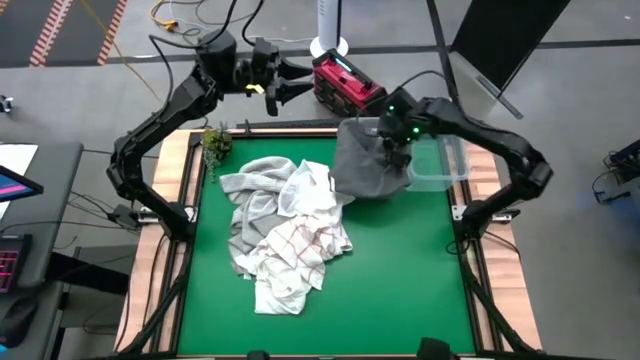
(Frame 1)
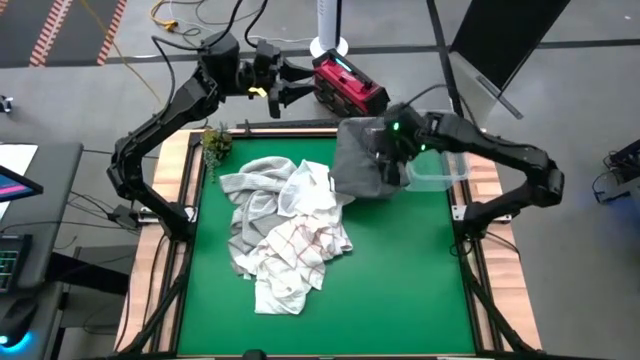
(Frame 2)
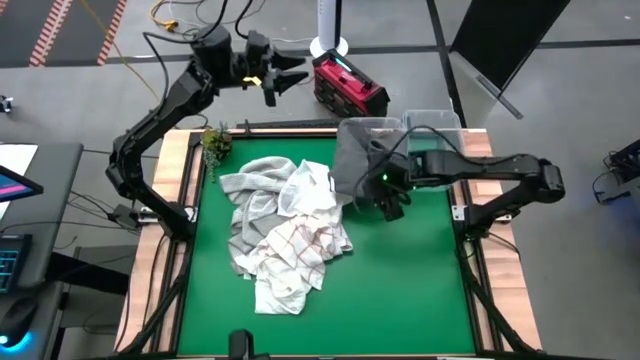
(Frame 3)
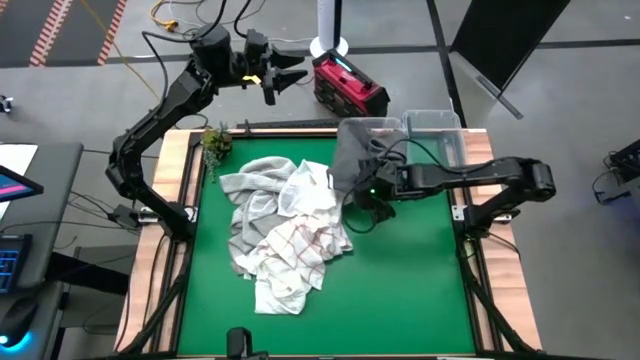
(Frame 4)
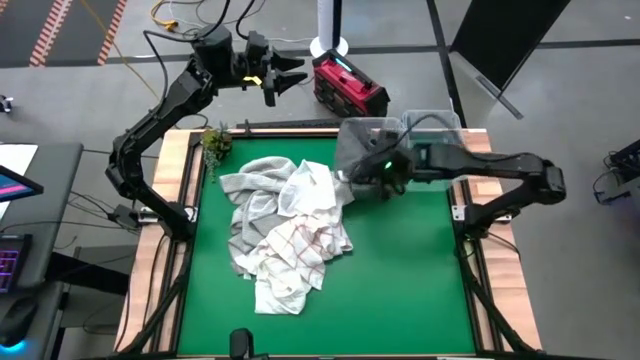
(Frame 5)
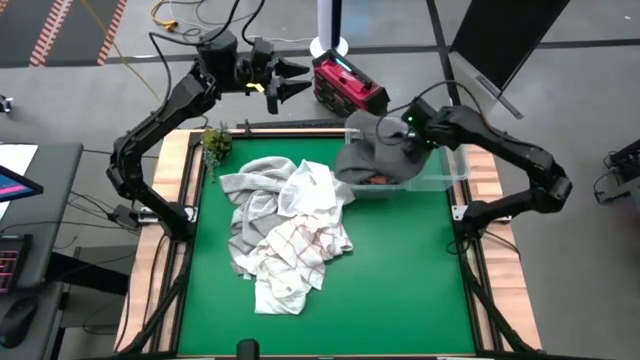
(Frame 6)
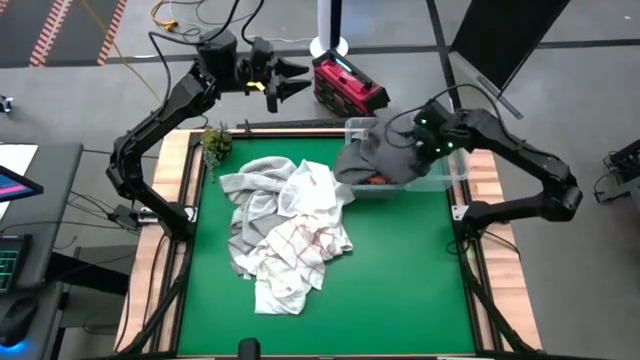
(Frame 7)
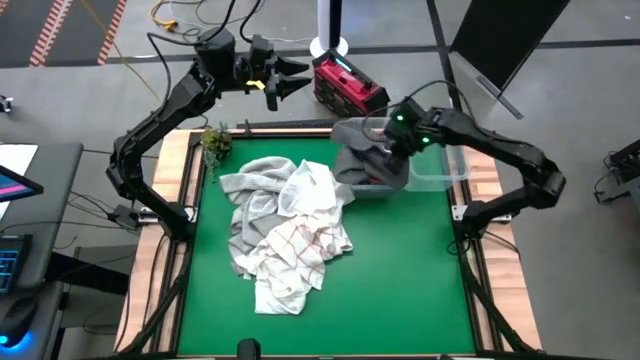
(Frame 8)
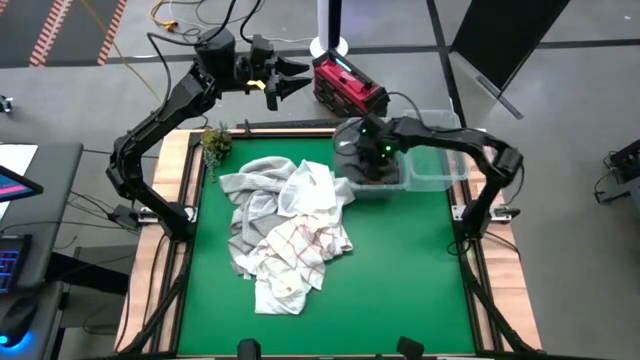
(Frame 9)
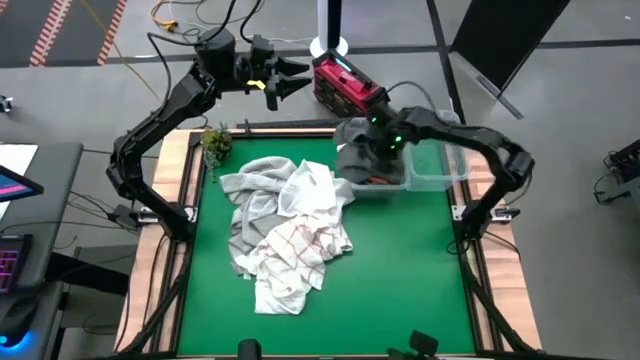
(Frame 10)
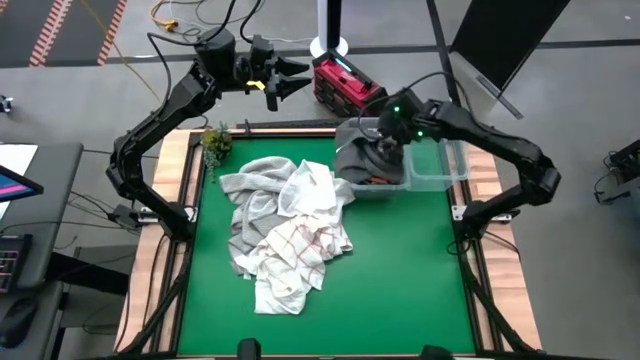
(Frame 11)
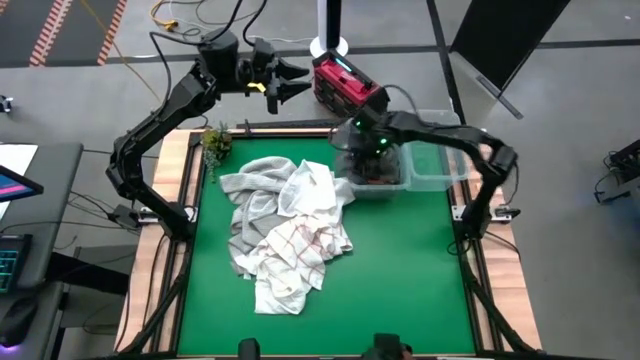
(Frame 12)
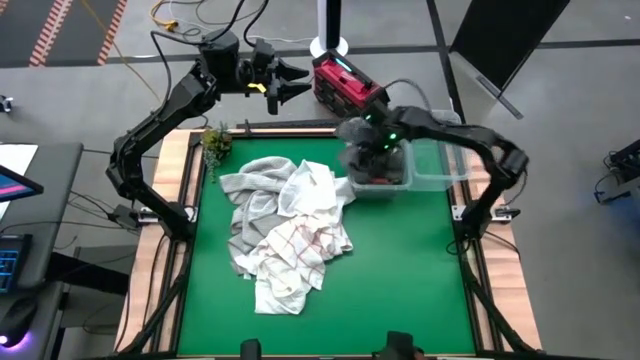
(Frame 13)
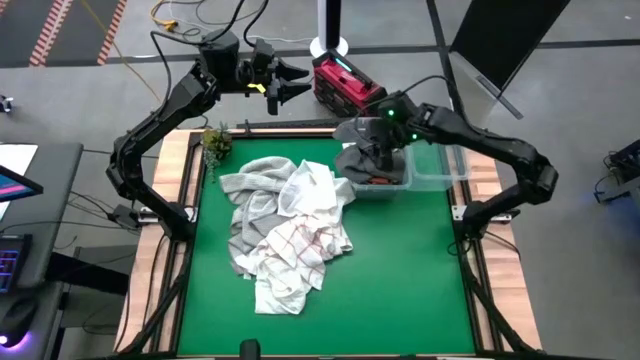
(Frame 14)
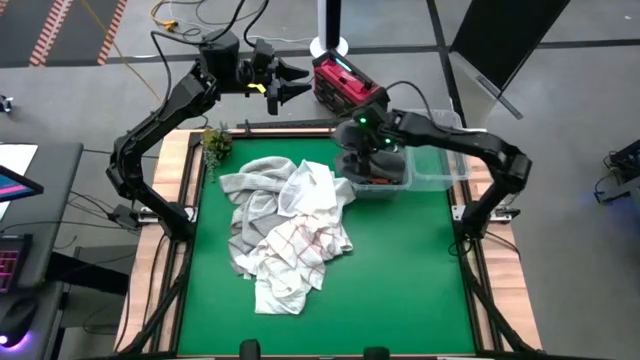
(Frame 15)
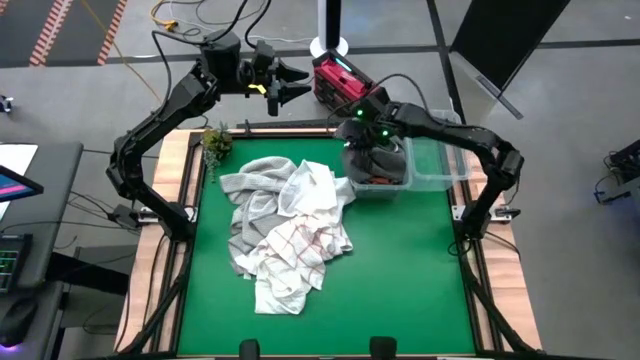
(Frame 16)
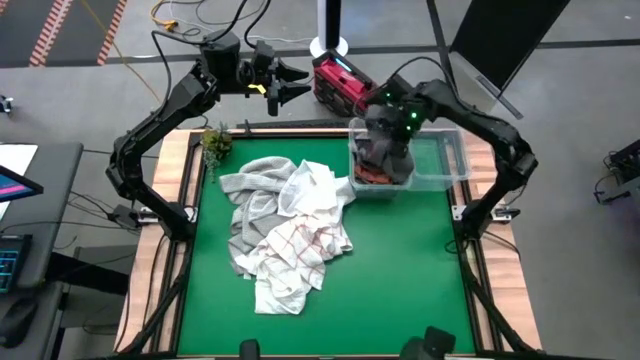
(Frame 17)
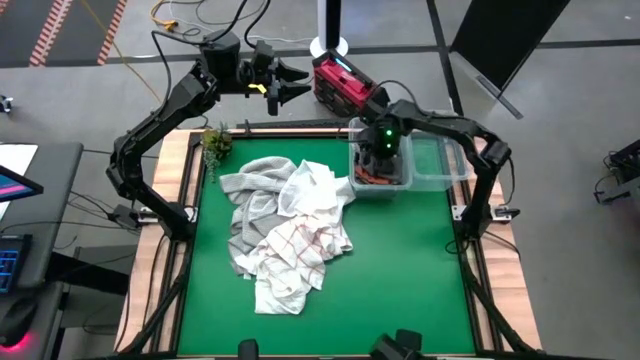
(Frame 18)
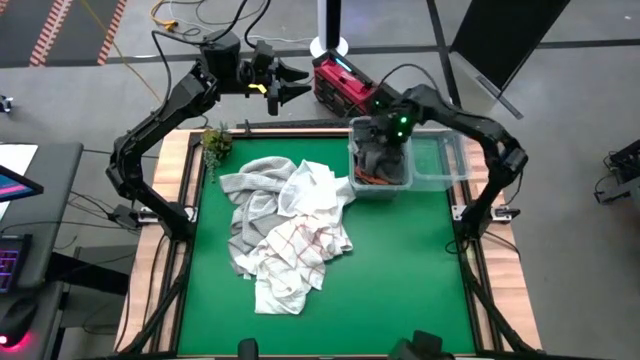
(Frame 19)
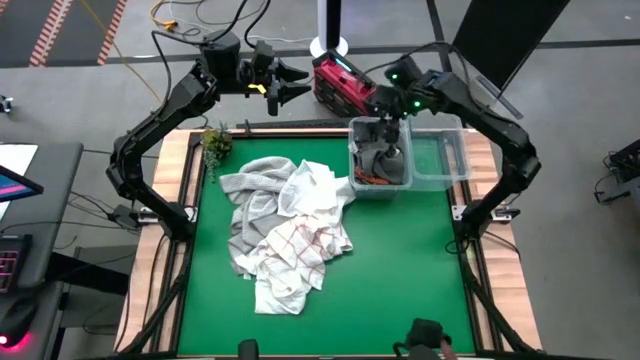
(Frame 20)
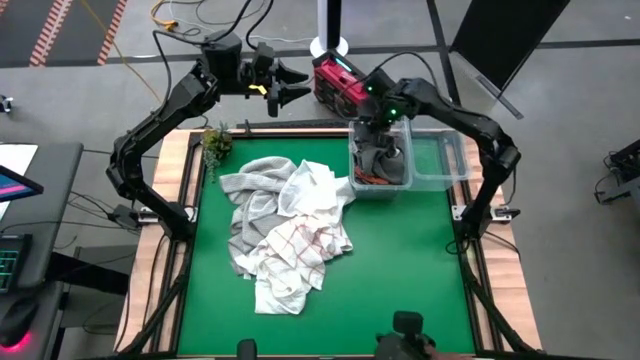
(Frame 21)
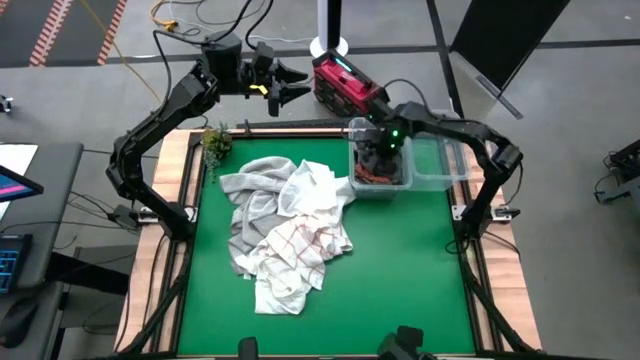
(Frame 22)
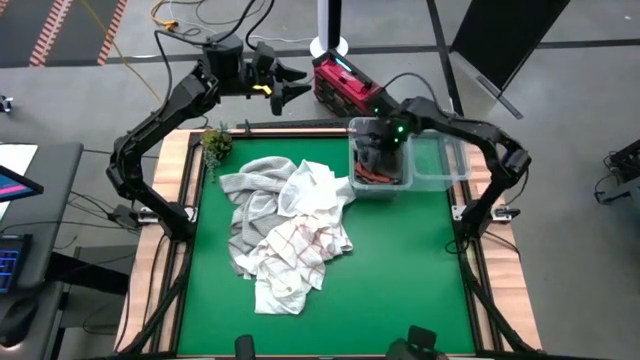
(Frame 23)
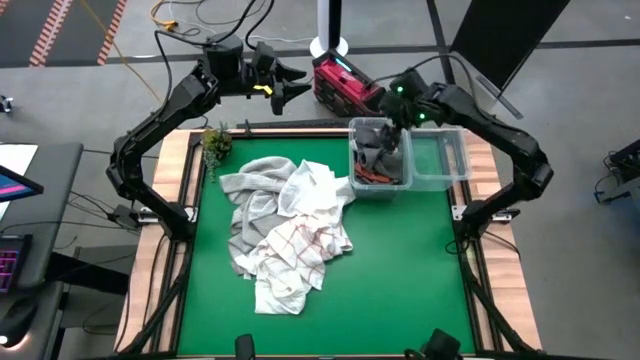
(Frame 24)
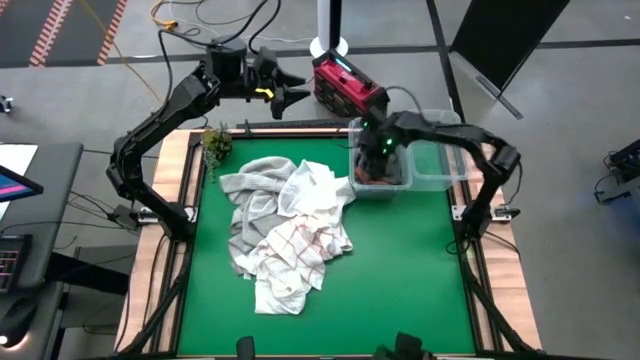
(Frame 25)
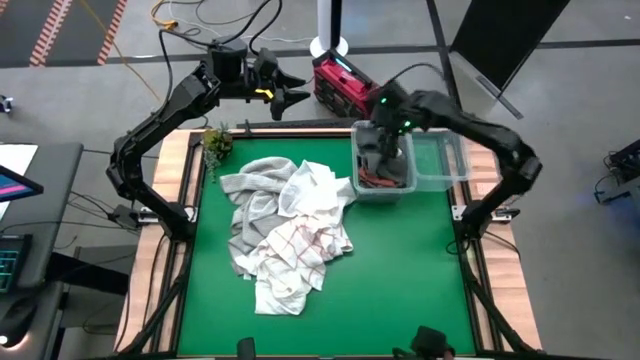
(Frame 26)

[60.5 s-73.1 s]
Task: Sort towels by color in basket
Put the dark gray towel into the left transparent bin

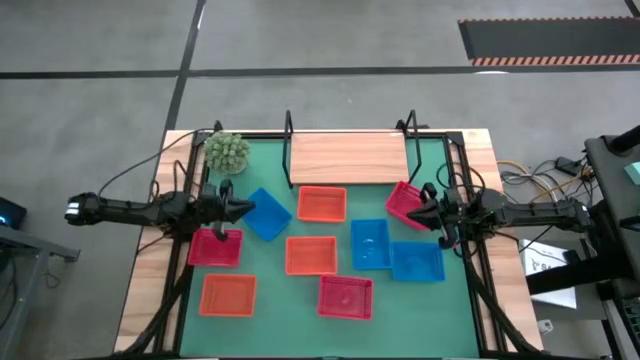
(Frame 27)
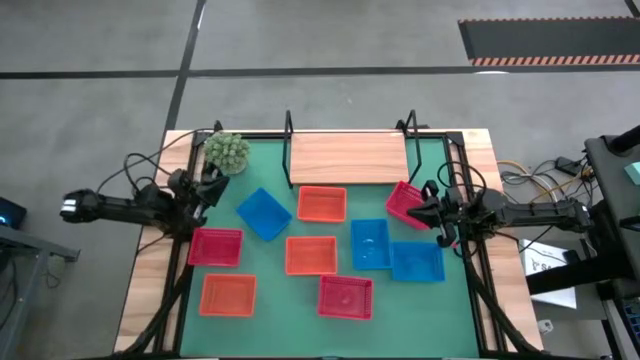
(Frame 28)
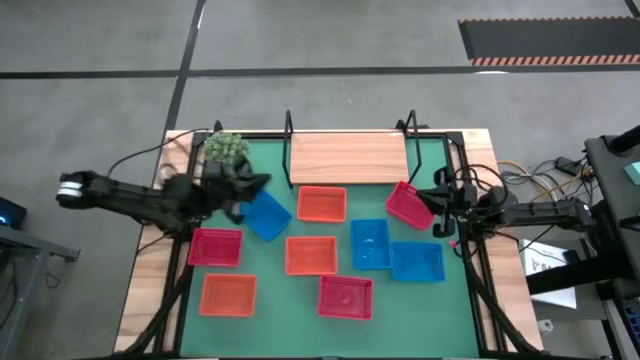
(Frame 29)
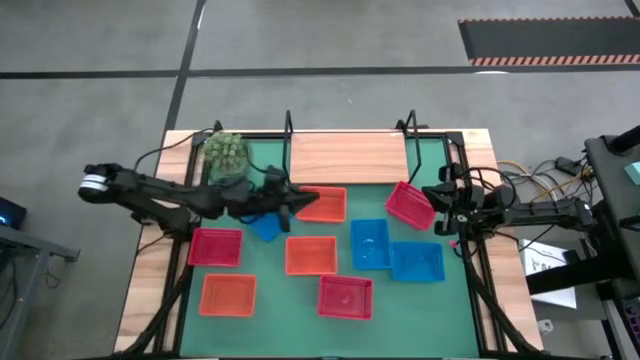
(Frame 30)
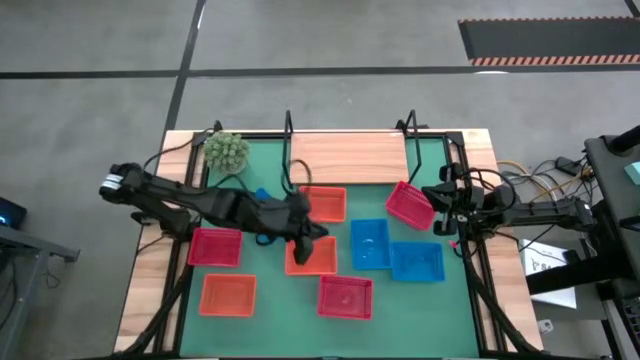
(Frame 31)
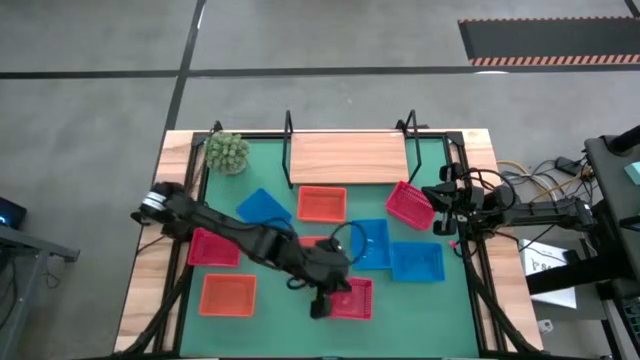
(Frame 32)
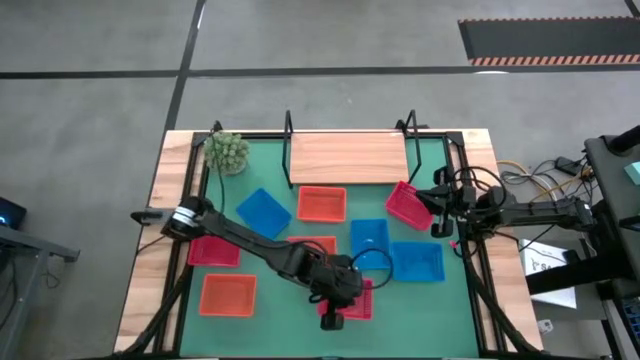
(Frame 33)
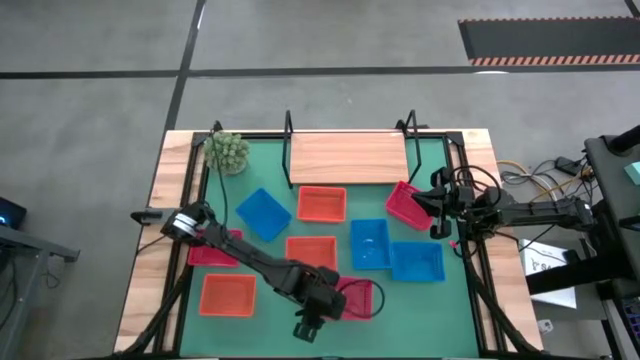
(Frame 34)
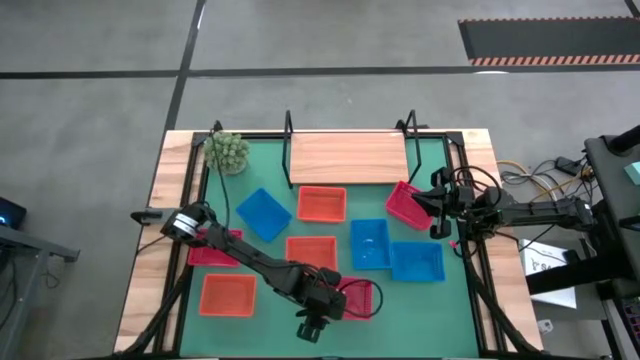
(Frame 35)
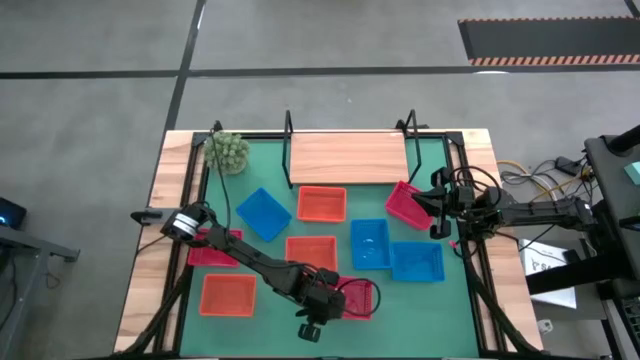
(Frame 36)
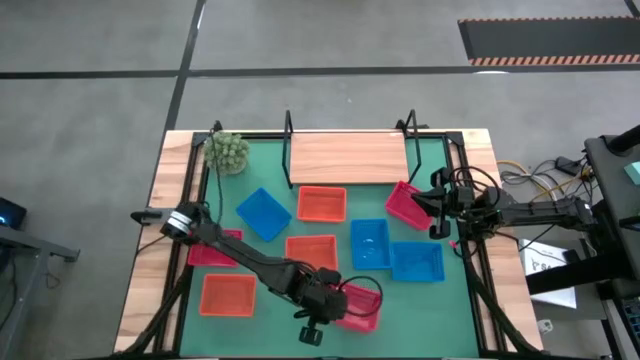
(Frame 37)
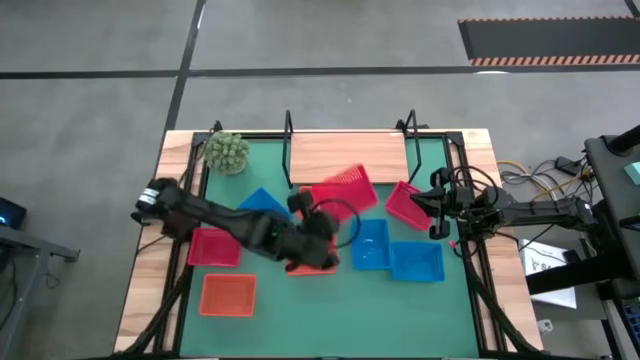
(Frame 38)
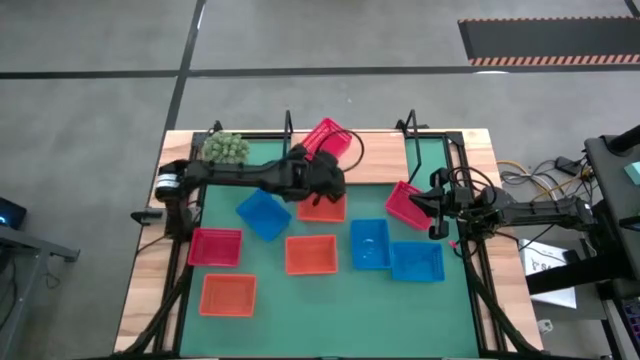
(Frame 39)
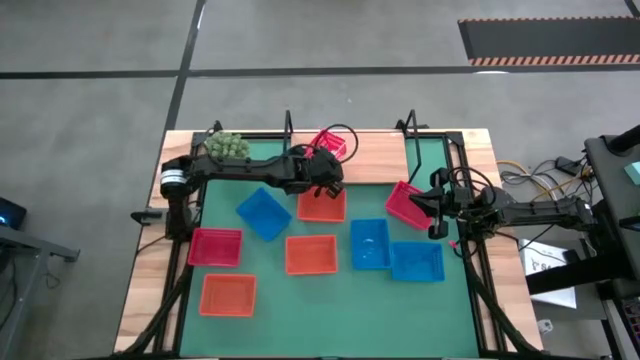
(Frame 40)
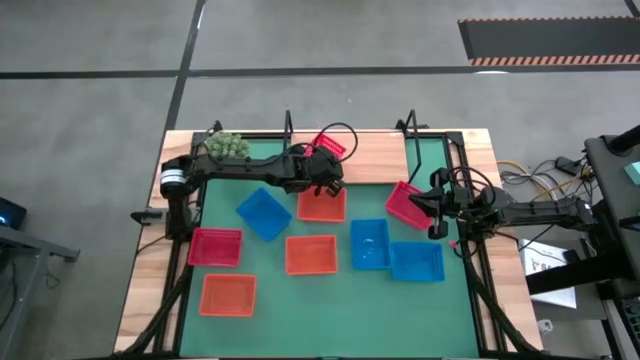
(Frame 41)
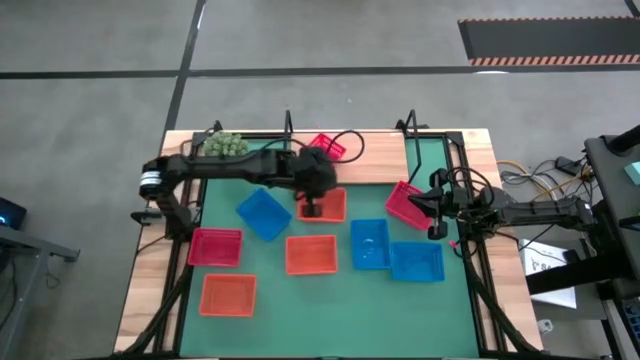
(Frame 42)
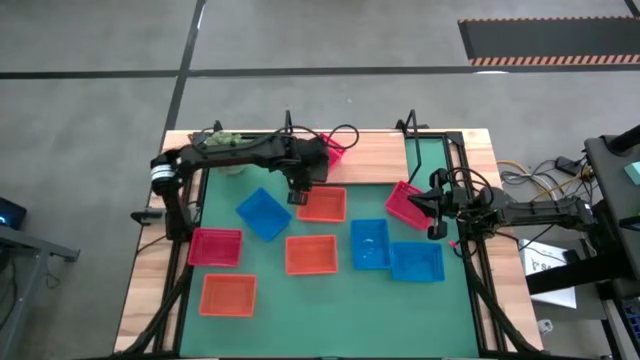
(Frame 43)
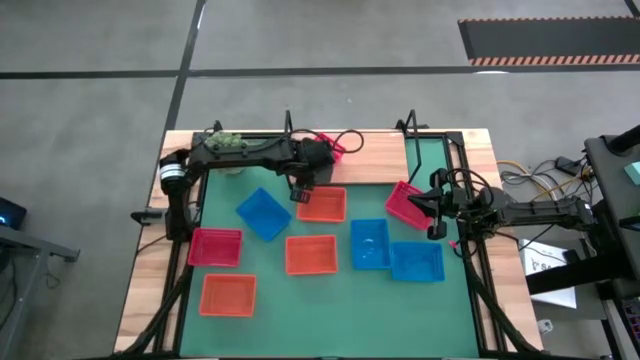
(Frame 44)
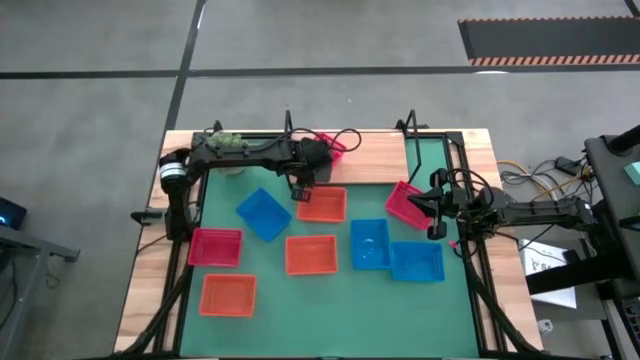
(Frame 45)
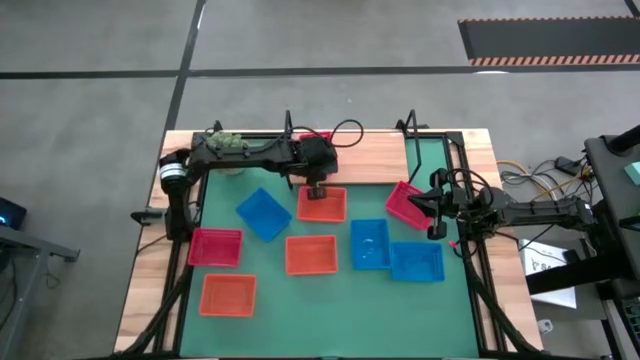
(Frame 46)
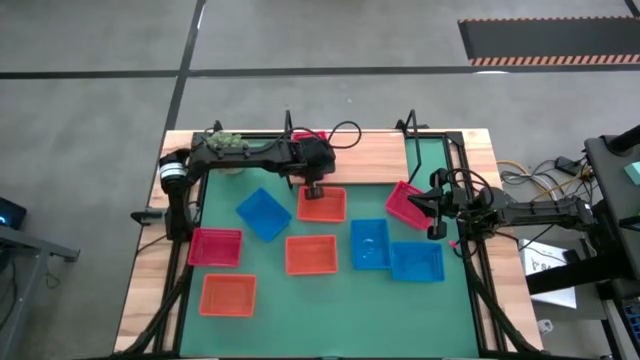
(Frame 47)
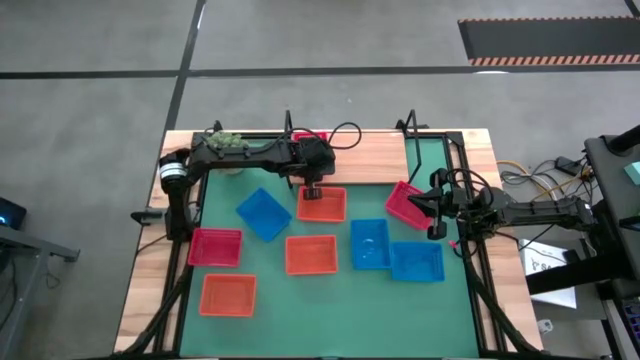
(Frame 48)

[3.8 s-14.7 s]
Task: Stack baskets on shelf by color
Put the bottom middle red bin on the shelf
